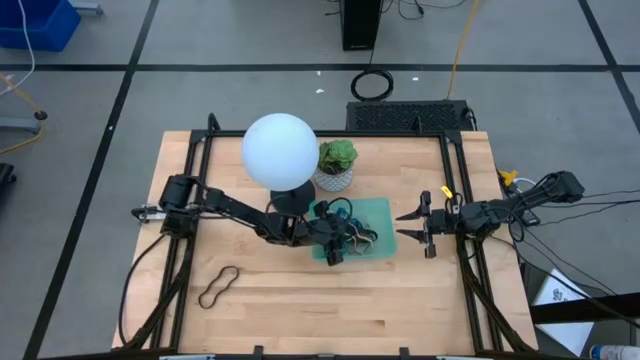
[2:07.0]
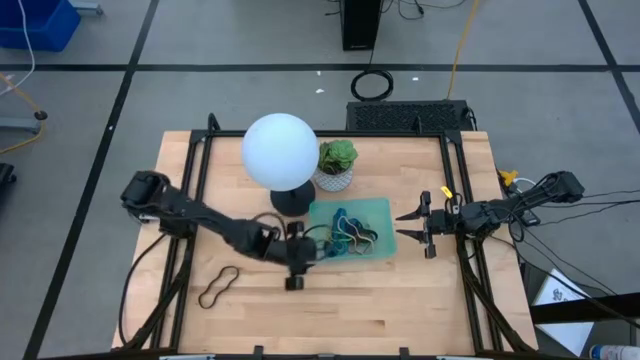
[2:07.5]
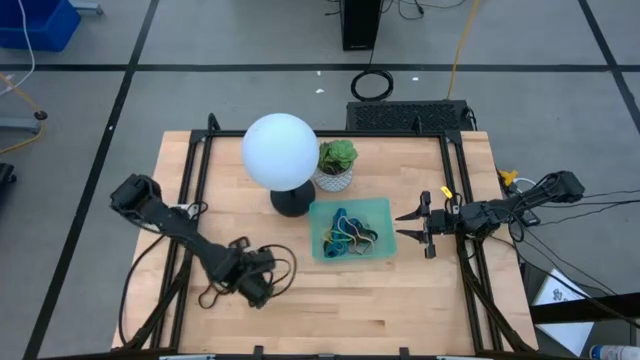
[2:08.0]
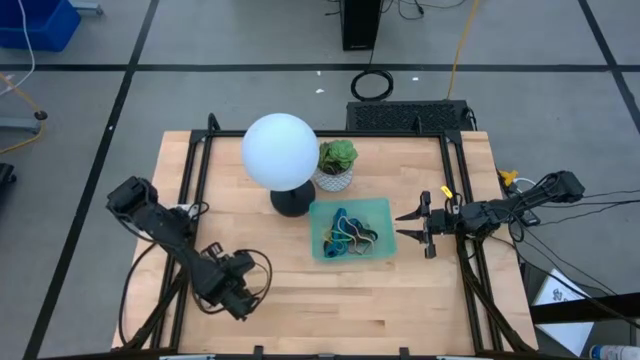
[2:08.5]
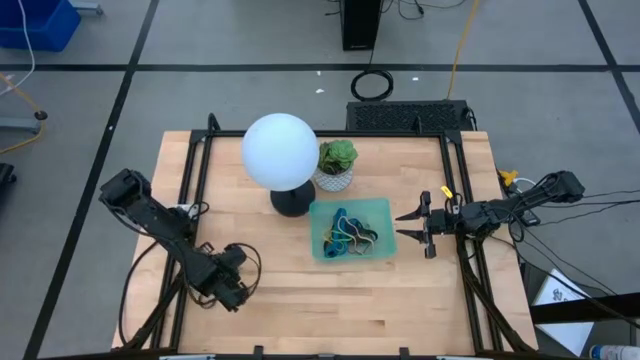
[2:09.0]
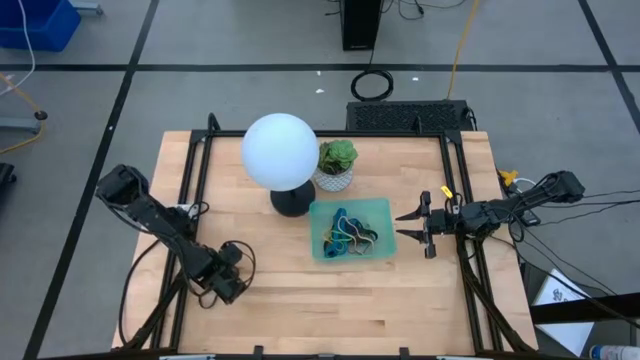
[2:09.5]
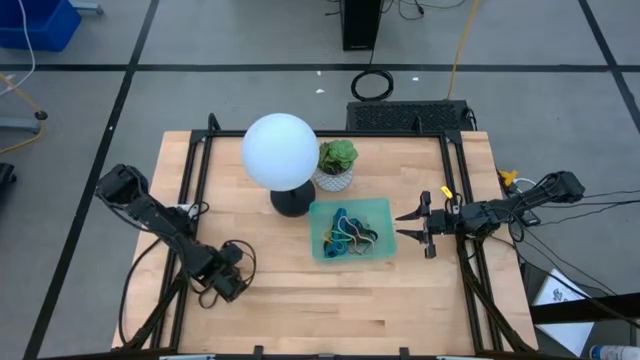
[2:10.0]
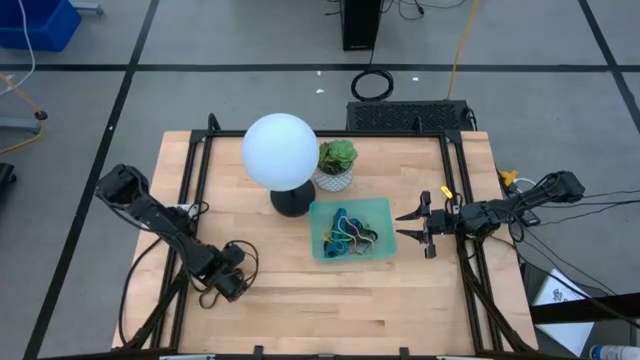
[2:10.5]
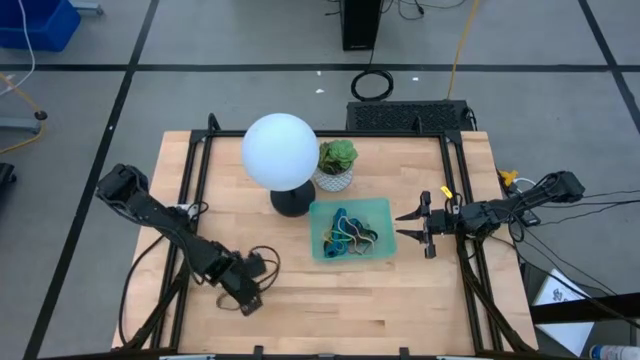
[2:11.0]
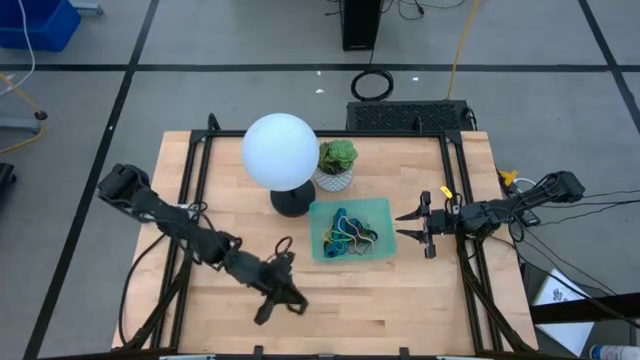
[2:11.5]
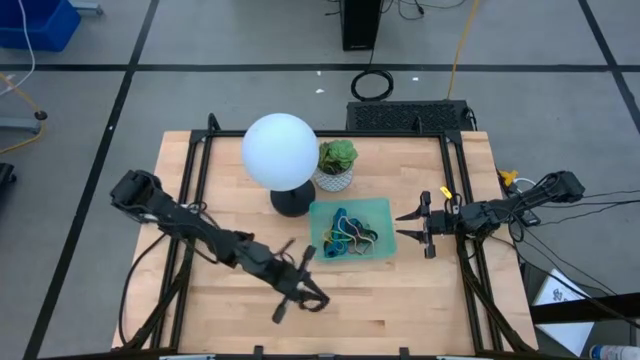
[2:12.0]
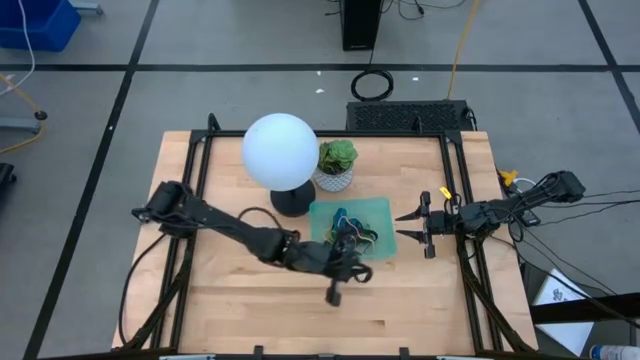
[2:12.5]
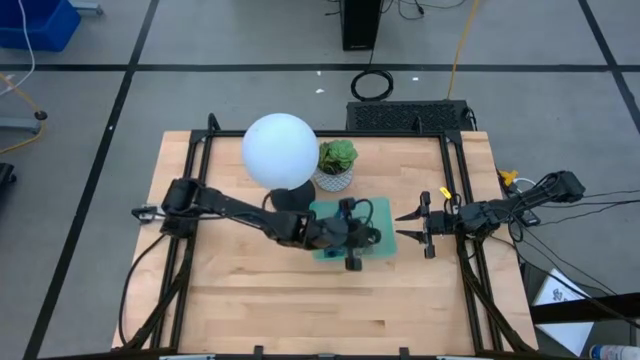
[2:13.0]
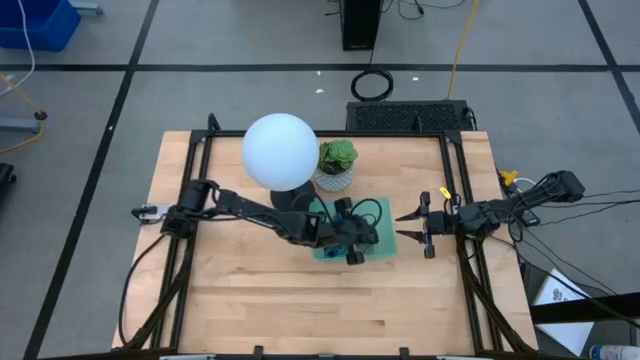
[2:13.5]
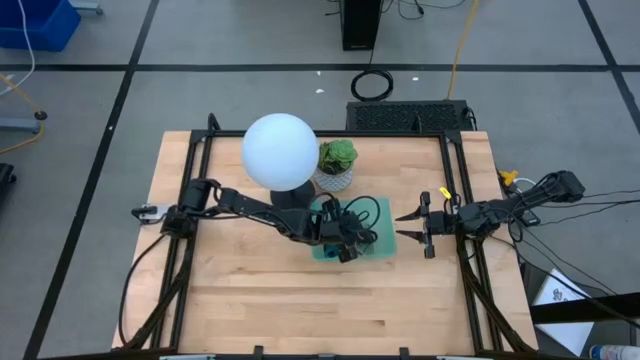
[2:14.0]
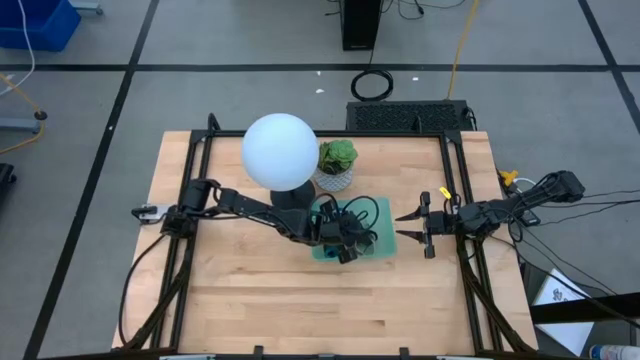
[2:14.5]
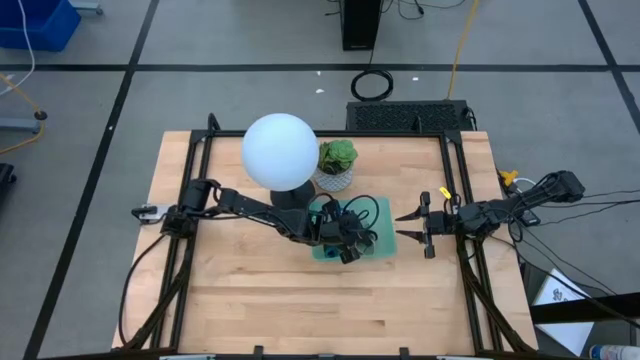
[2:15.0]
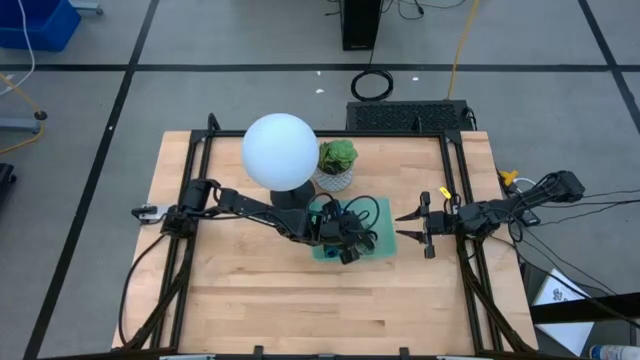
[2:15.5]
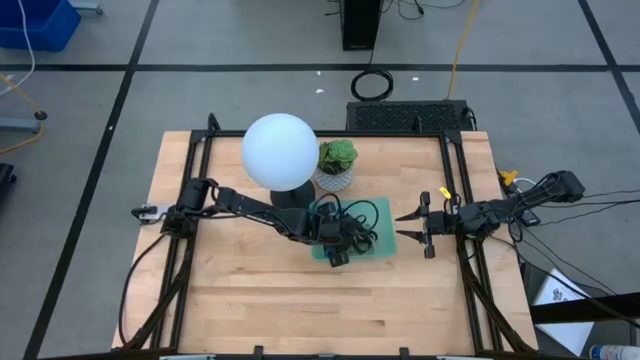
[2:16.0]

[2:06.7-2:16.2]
Task: Pick and place rubber bands into bin
Put the black rubber band into the blue bin

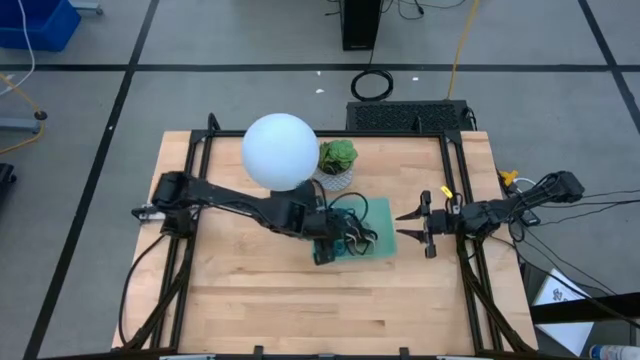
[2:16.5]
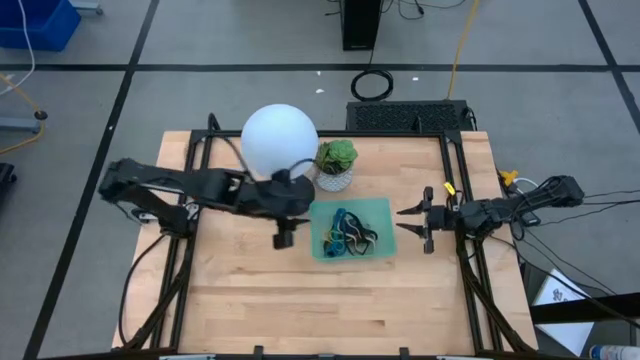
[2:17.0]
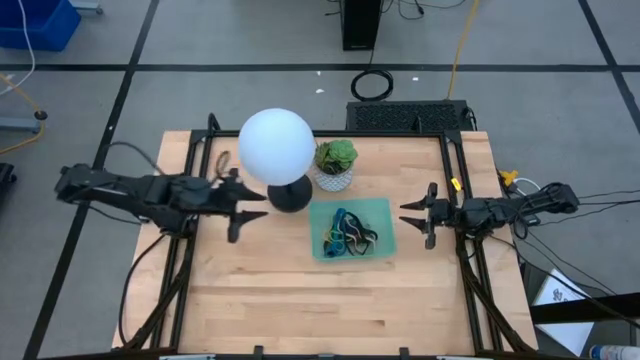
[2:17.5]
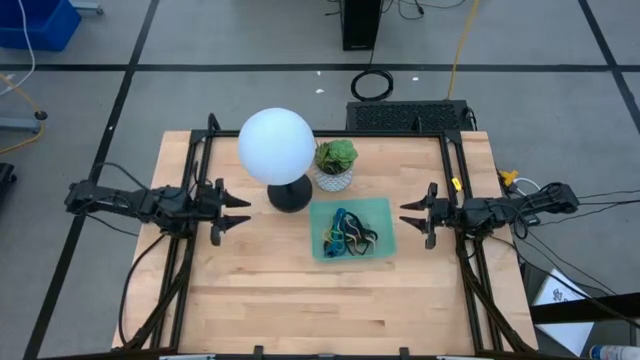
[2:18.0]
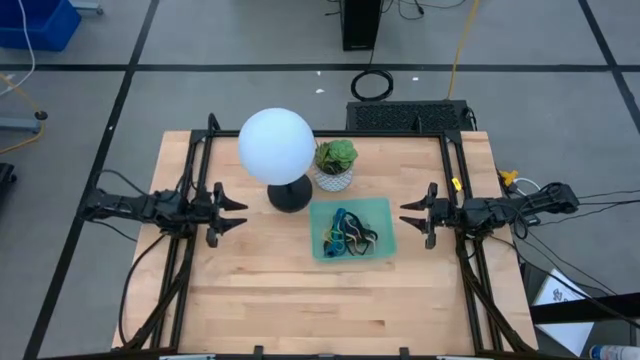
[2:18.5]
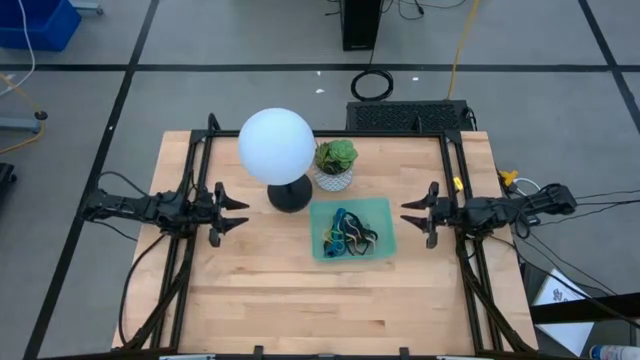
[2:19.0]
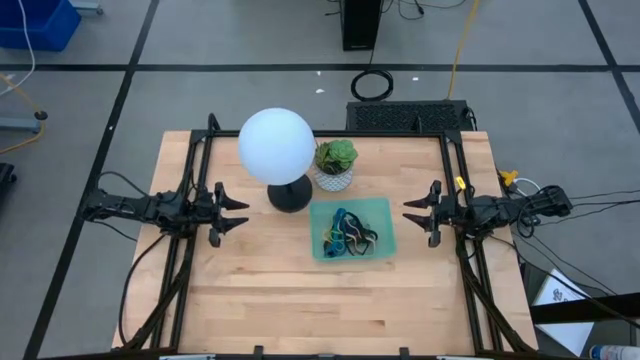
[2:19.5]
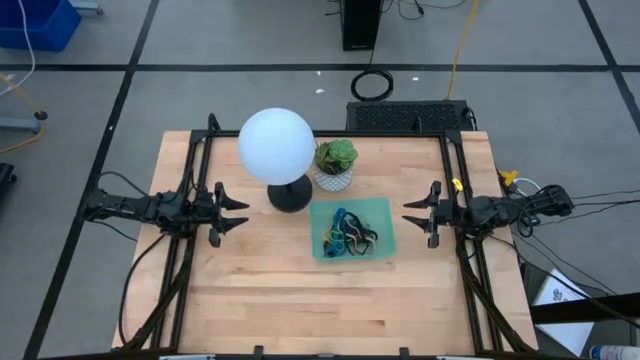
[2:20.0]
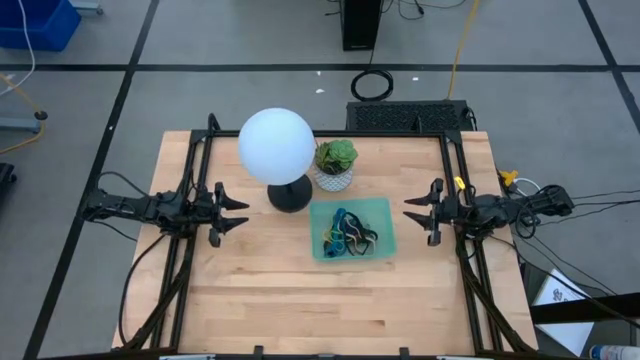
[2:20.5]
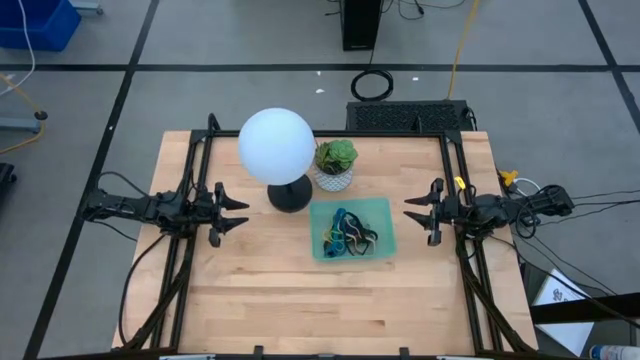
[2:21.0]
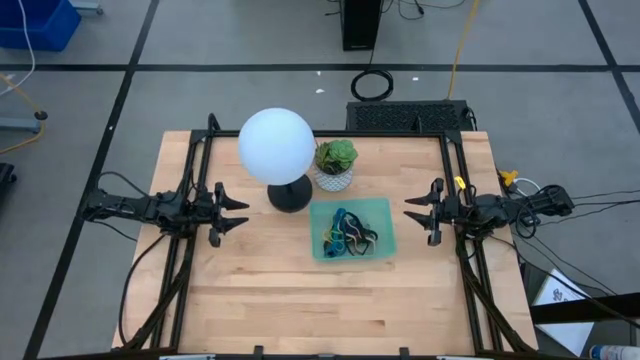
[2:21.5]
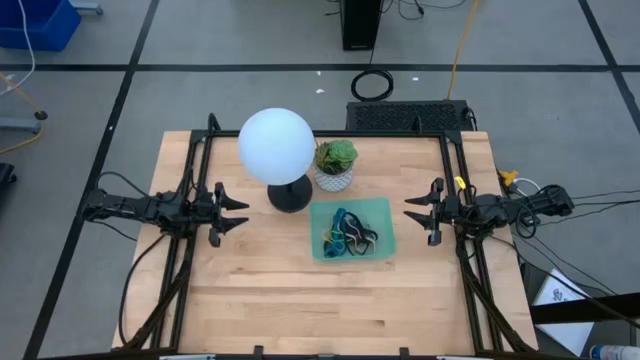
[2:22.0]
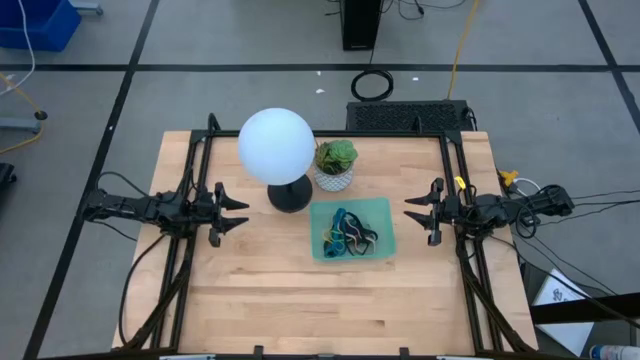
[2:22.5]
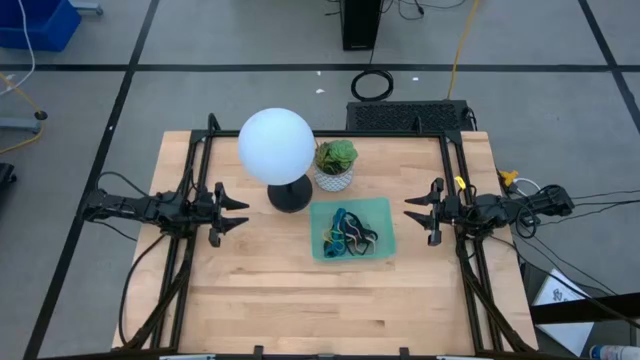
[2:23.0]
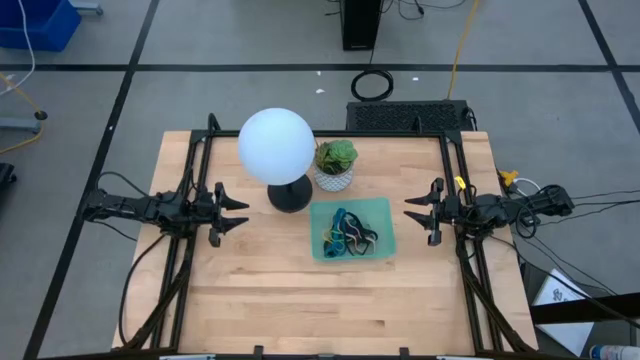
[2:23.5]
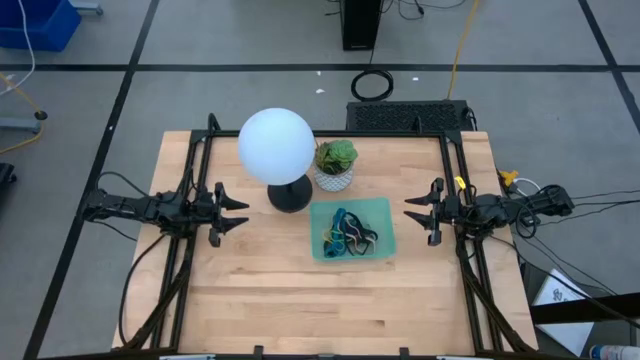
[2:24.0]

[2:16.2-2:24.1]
Return to Home Position

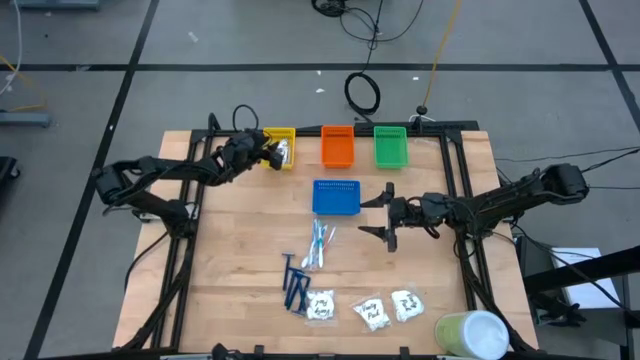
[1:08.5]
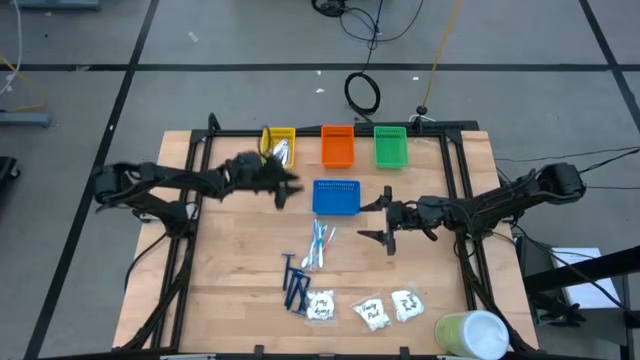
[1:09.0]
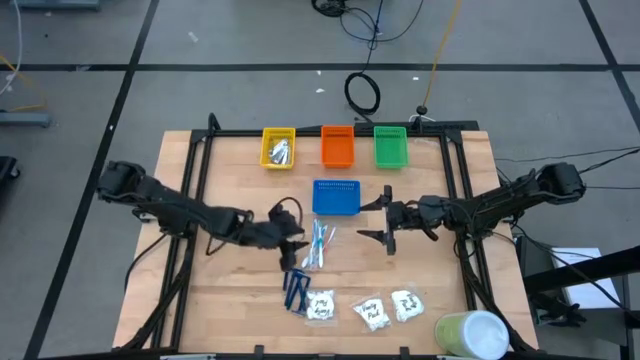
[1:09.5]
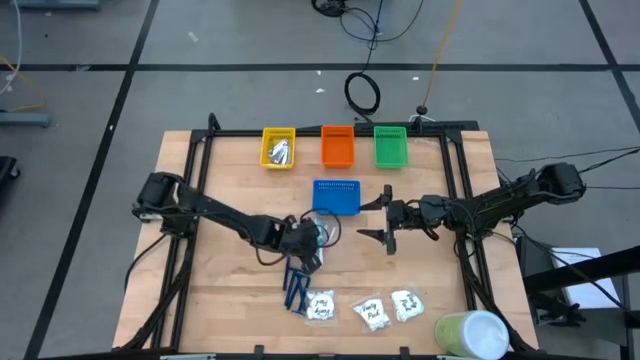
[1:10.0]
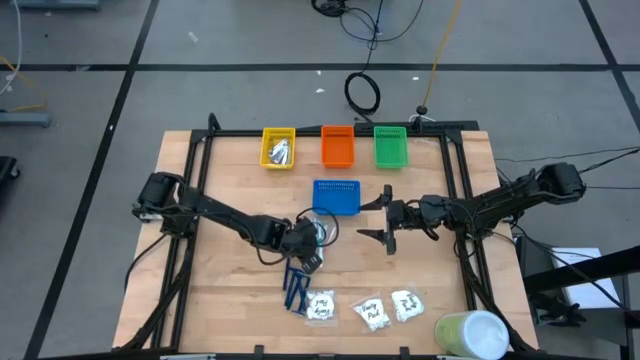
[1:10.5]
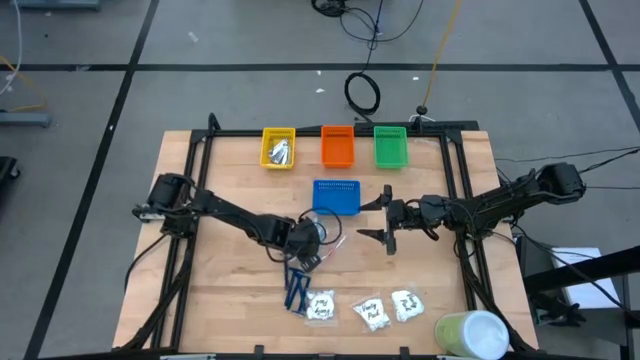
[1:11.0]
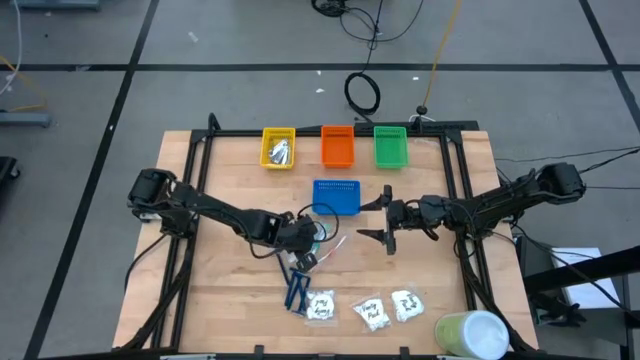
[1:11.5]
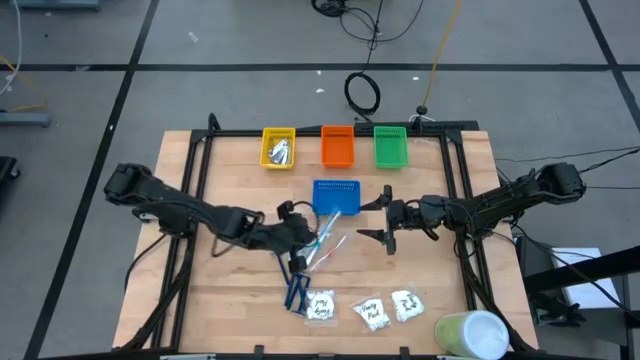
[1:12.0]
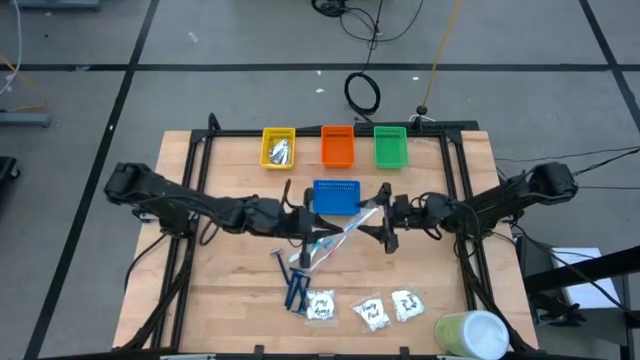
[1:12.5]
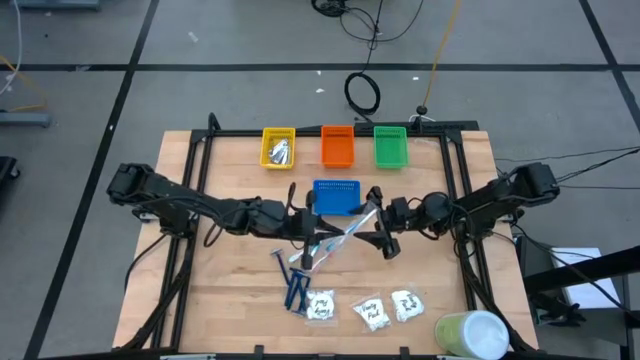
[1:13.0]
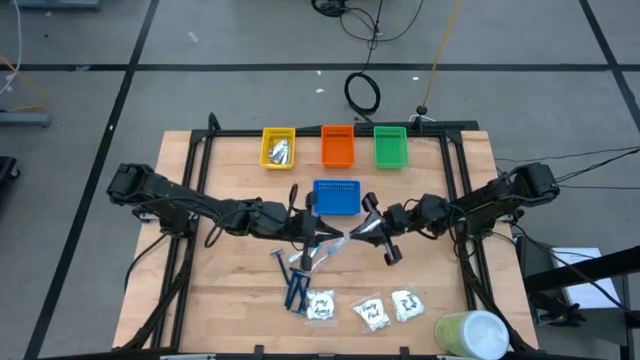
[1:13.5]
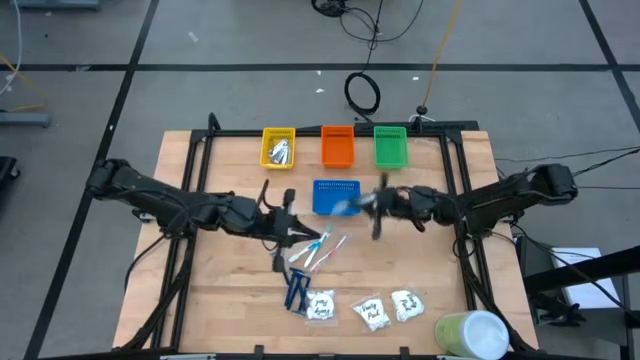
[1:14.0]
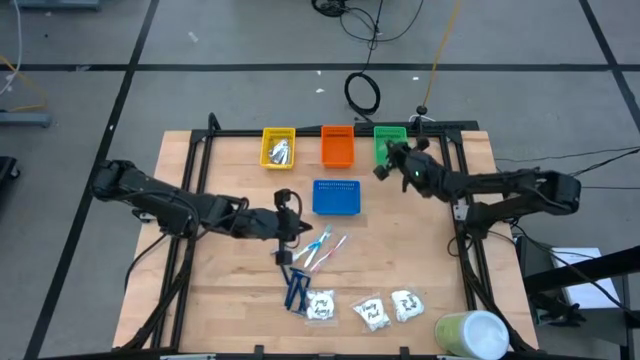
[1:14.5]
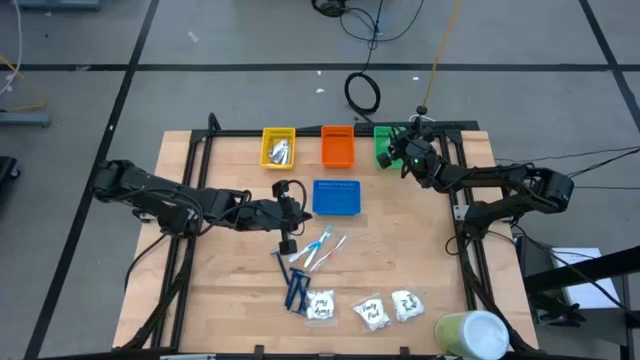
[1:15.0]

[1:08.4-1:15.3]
Task: Pick & Place Travel size toiletries
Put the blue toothbrush into the green basket
